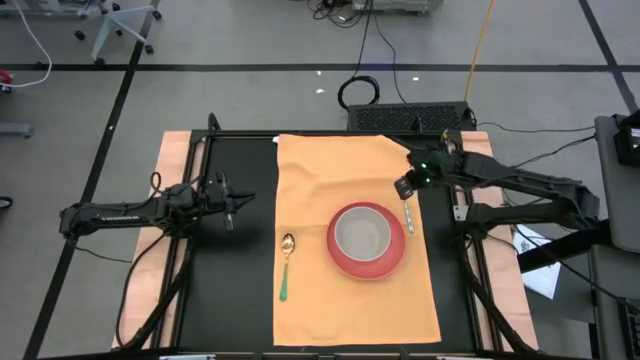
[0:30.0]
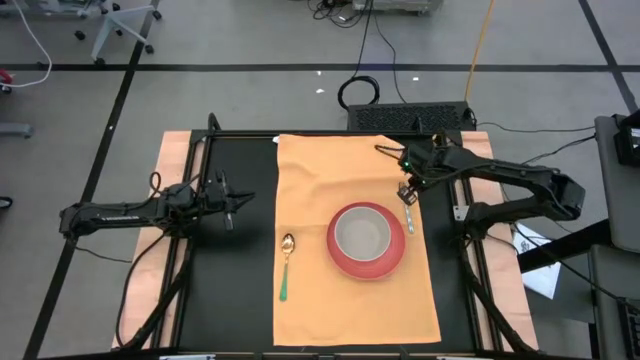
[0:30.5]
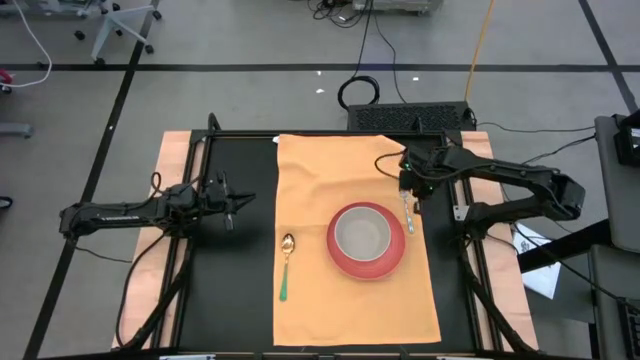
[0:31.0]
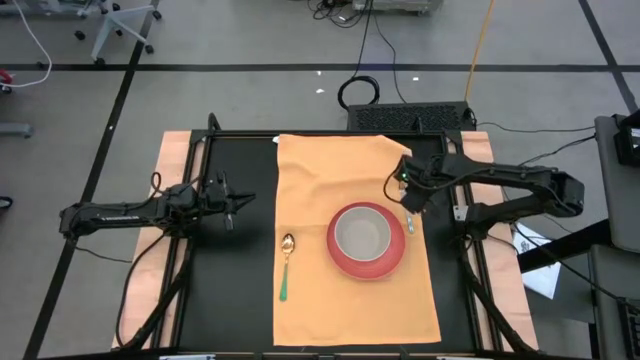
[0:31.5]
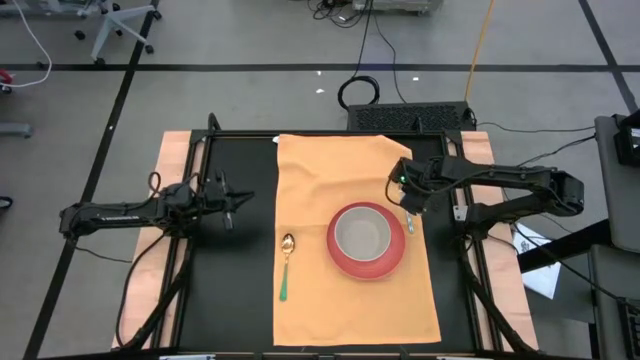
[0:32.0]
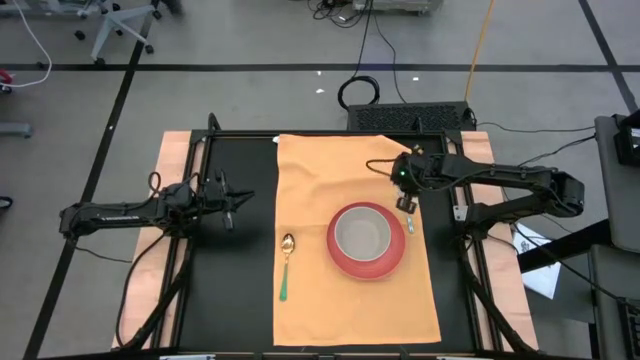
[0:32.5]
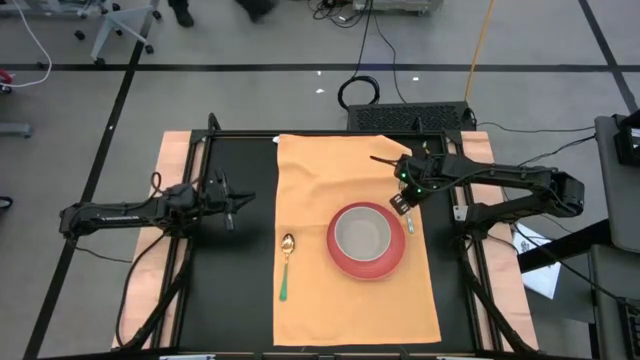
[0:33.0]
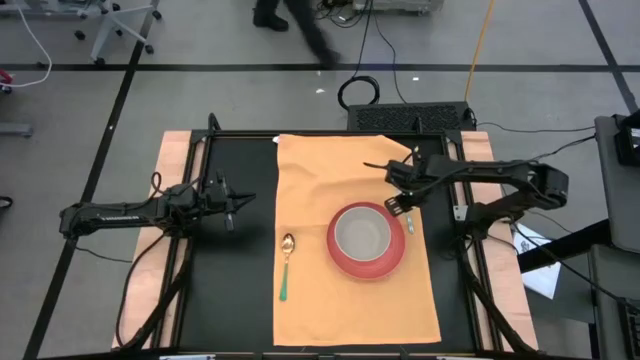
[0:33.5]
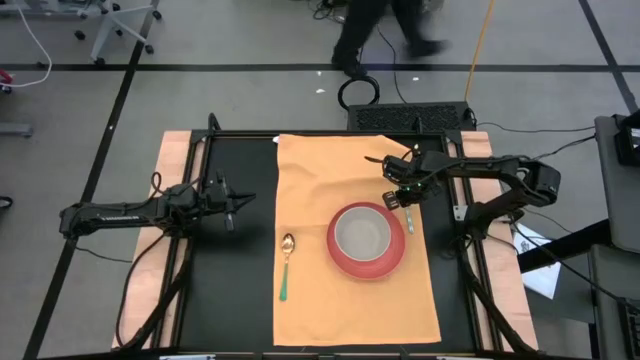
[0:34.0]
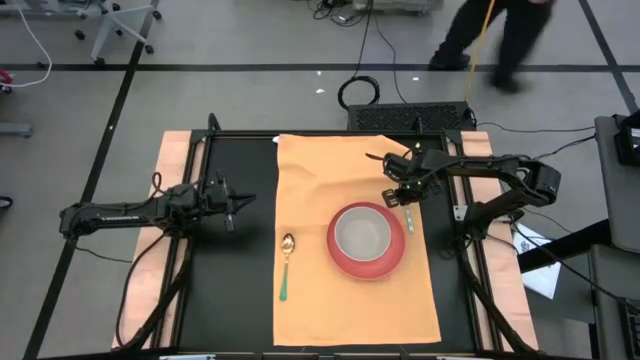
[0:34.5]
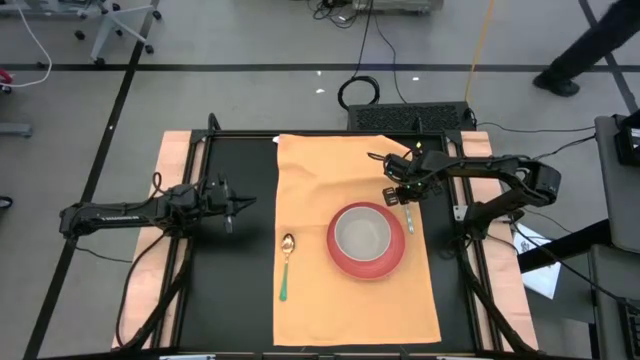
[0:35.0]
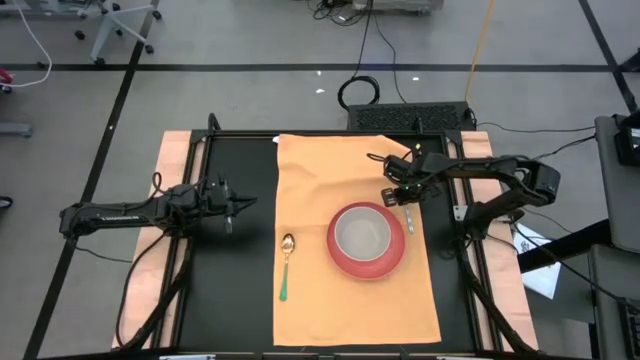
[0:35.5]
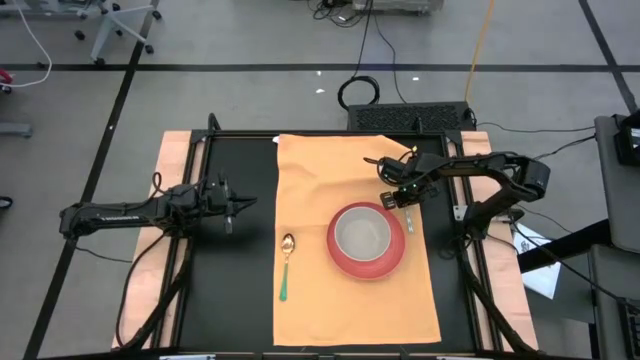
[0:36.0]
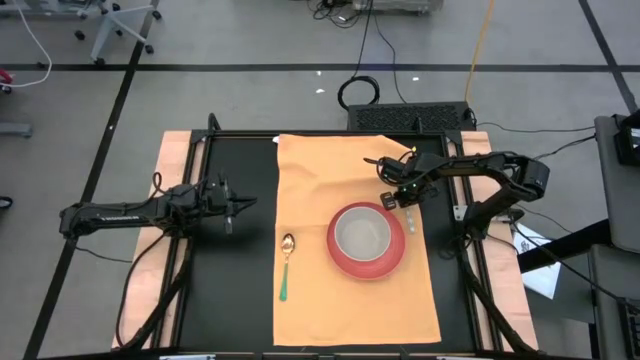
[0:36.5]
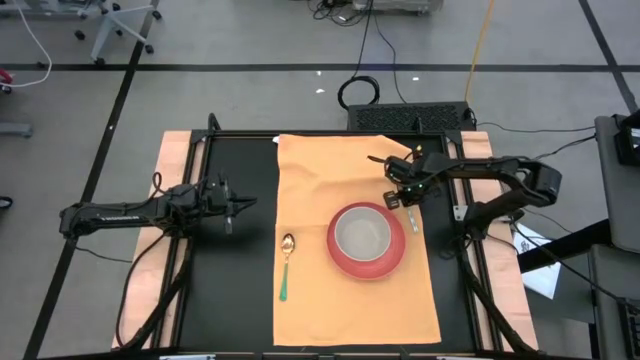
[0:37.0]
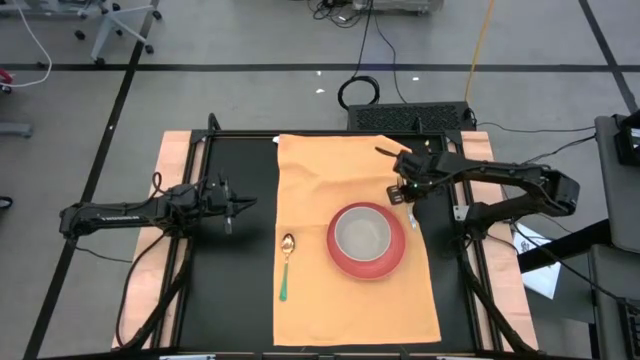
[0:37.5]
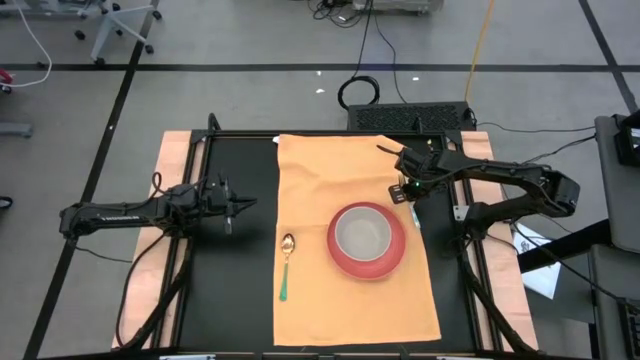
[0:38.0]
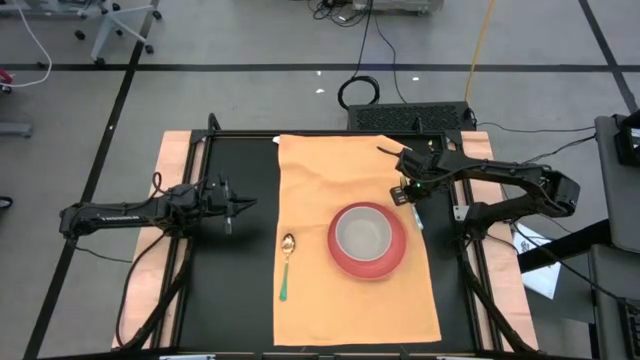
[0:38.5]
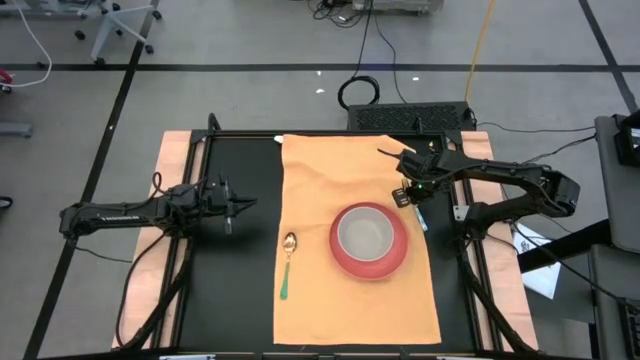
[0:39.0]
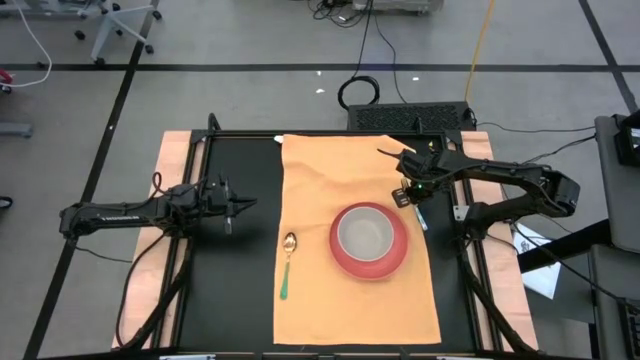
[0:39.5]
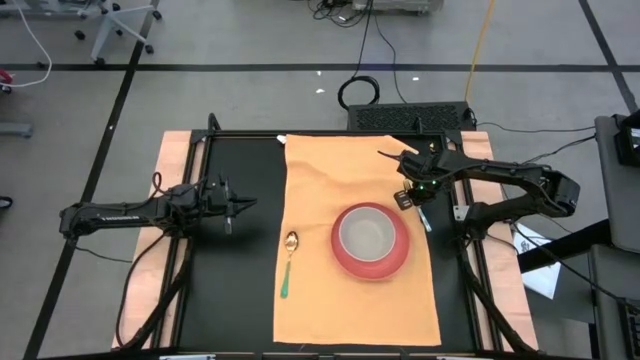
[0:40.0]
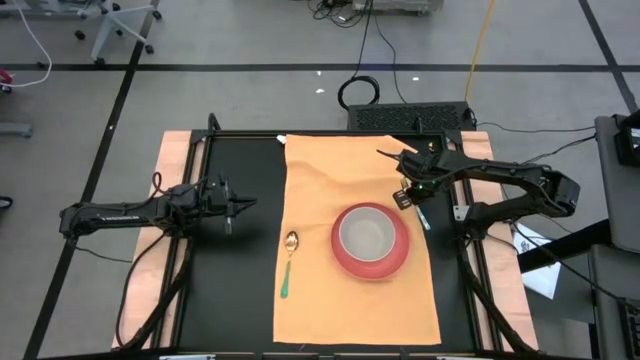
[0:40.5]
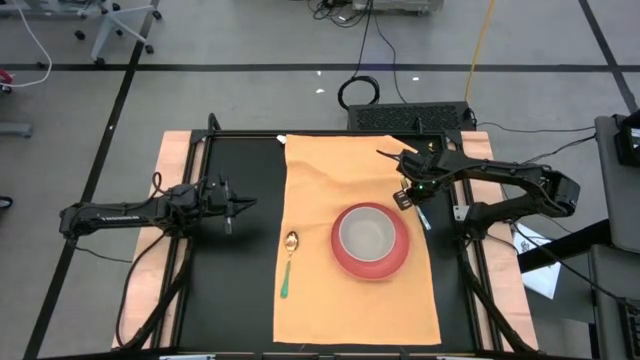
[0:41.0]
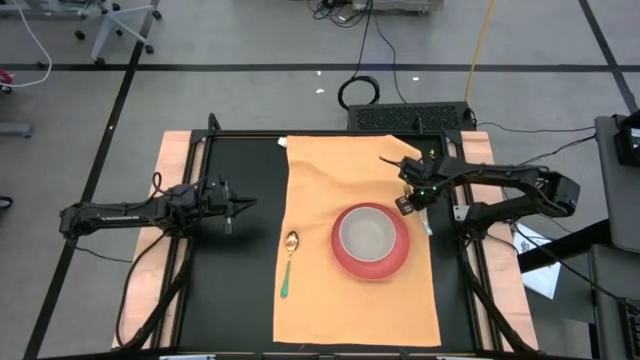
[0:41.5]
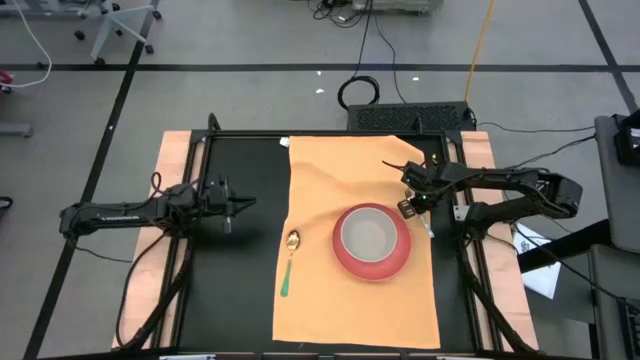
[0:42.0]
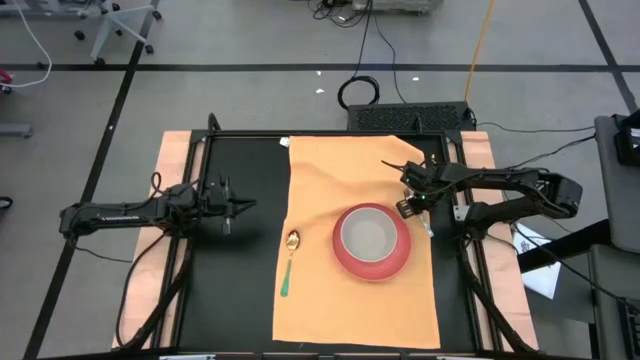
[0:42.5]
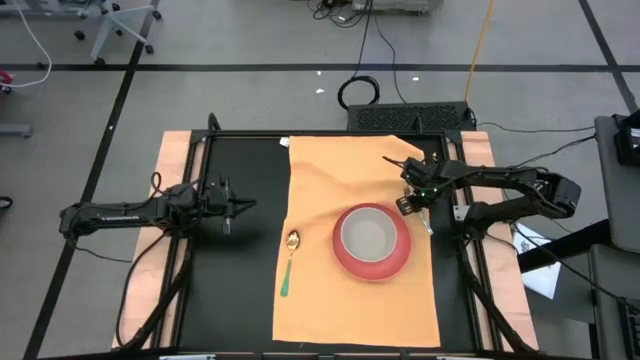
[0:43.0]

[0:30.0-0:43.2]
Task: Set table place
Put the fork to the right of the plate on the napkin

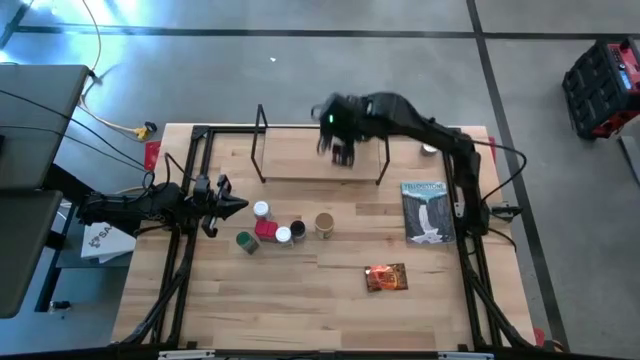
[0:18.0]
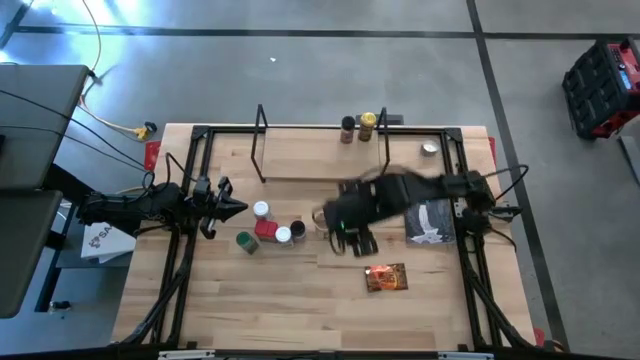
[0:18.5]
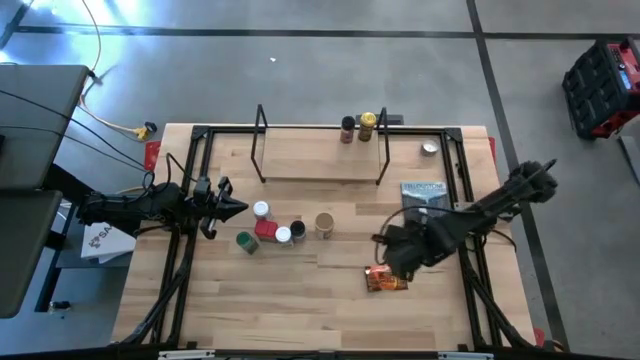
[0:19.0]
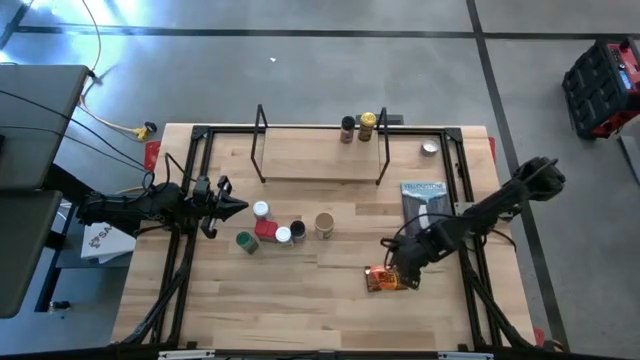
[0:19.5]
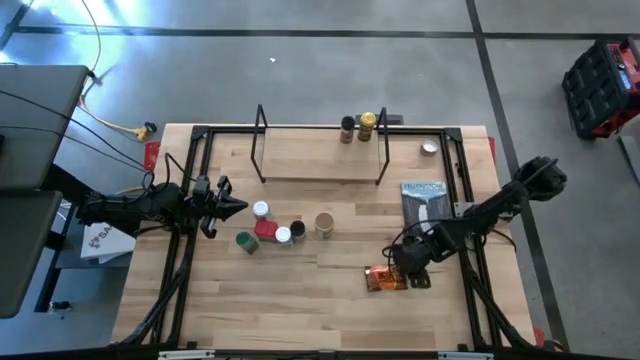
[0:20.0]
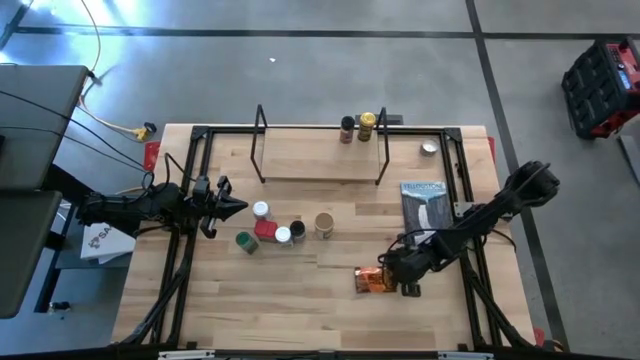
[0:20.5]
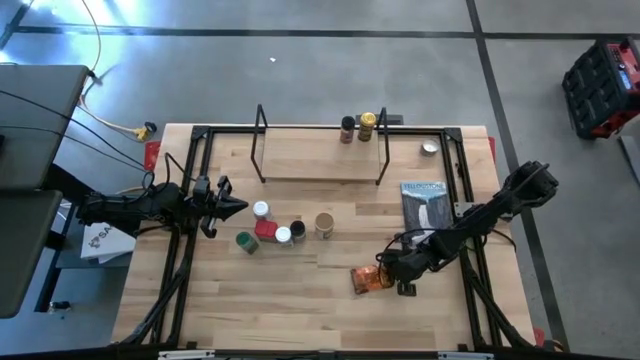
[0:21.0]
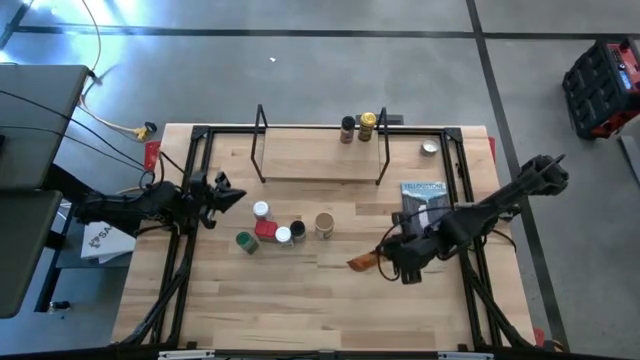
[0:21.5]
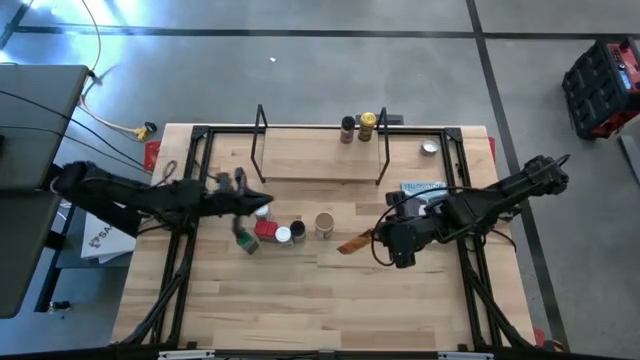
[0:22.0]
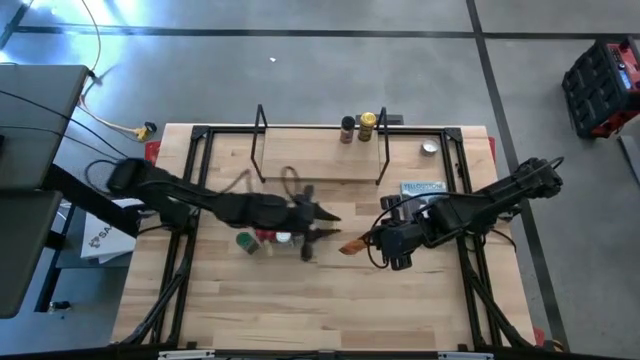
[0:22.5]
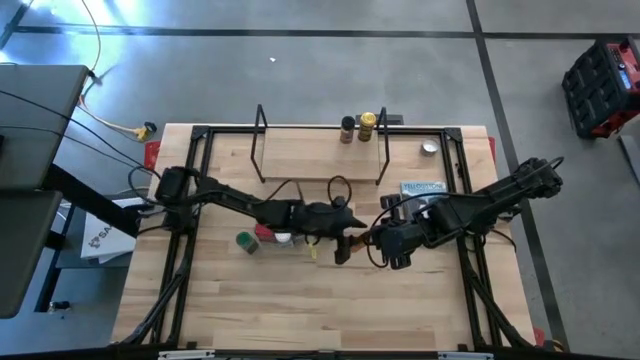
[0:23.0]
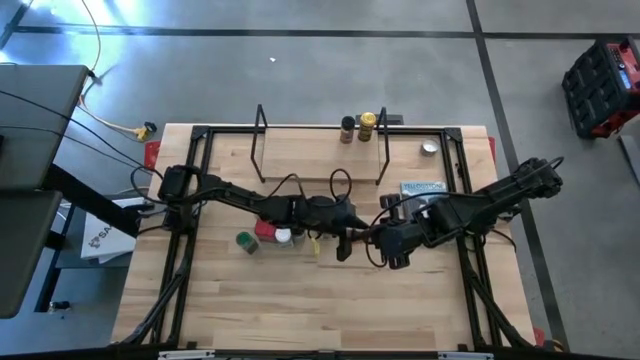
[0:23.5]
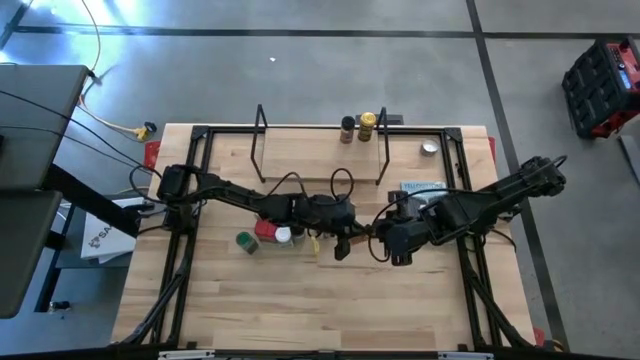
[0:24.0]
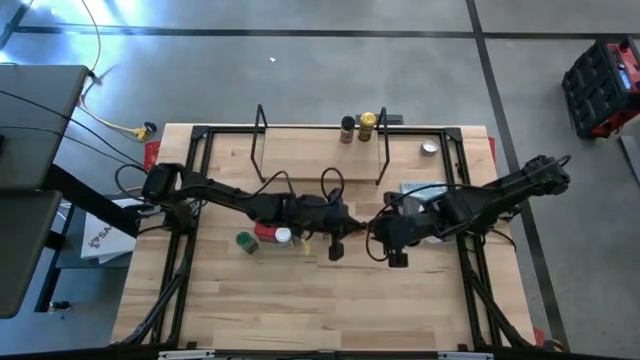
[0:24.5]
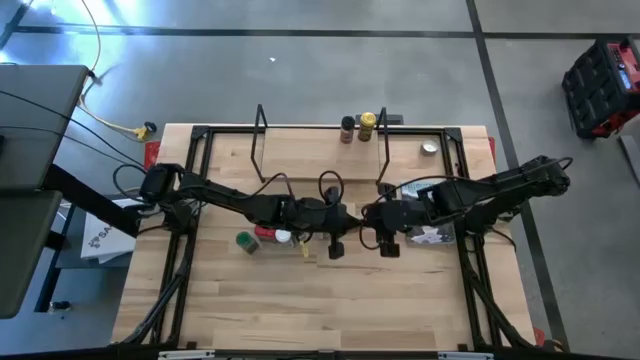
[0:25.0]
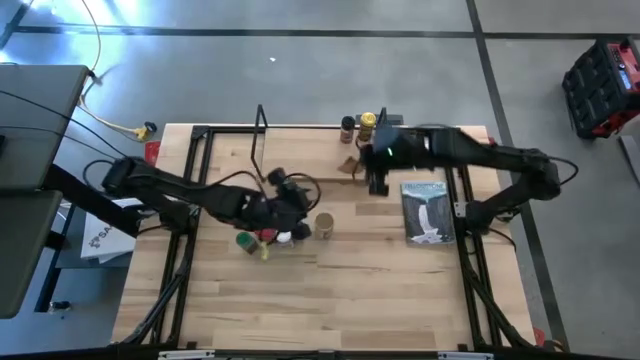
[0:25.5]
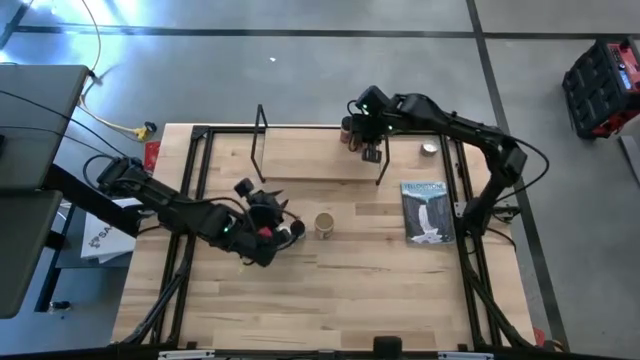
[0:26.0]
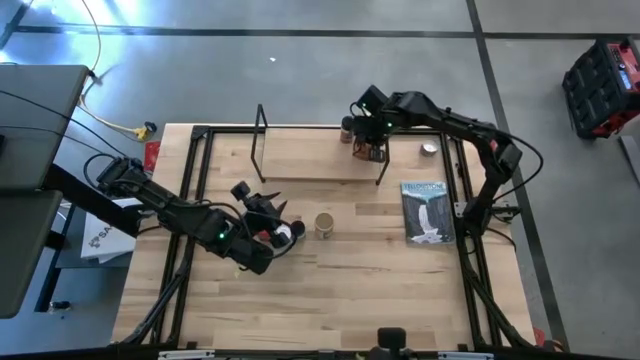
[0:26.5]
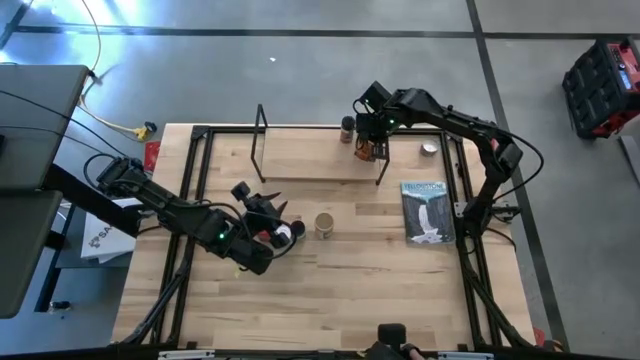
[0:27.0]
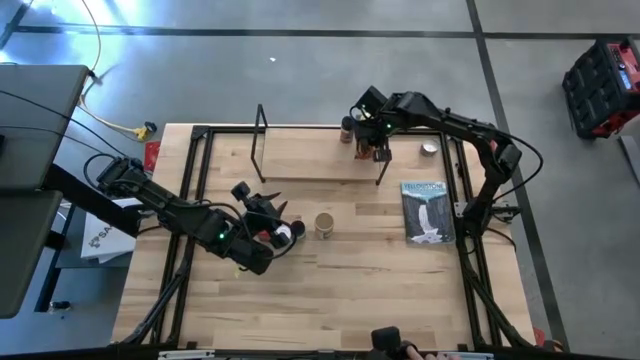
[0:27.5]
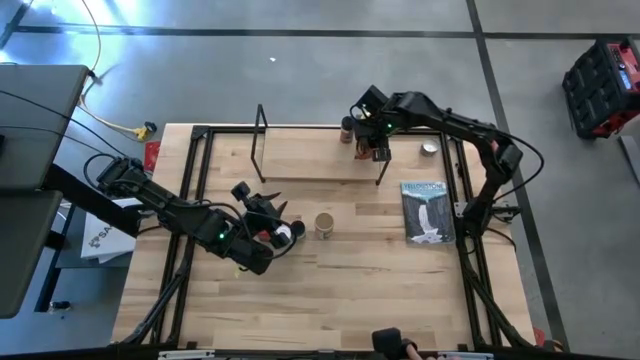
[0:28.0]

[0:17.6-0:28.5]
Task: Shelf spices
Put the orange seasoning pack on the shelf
